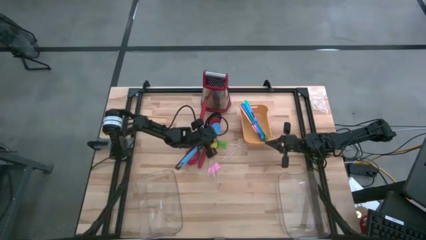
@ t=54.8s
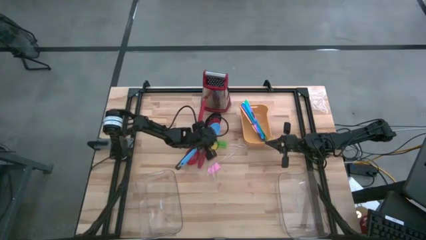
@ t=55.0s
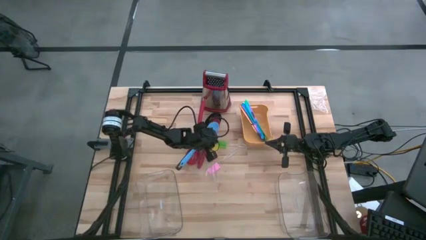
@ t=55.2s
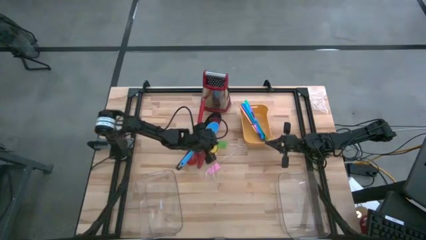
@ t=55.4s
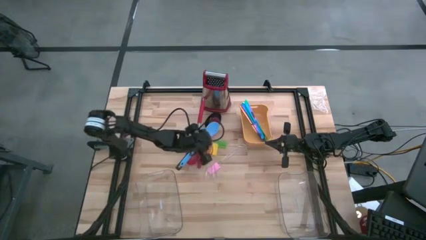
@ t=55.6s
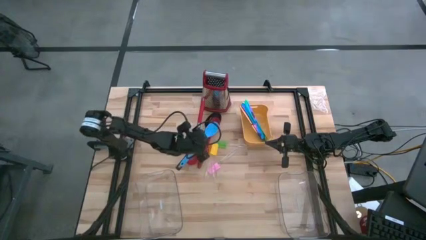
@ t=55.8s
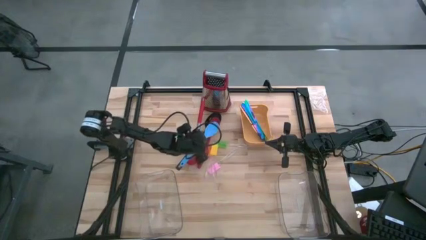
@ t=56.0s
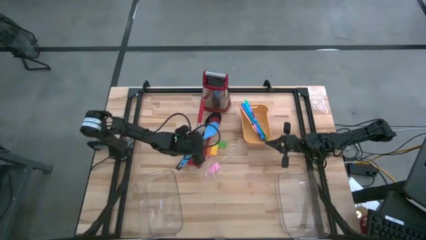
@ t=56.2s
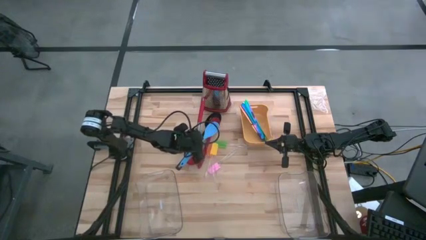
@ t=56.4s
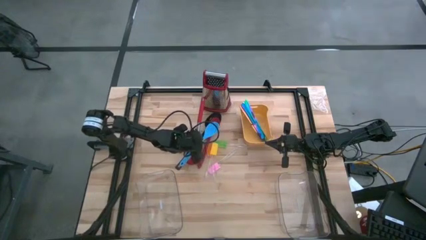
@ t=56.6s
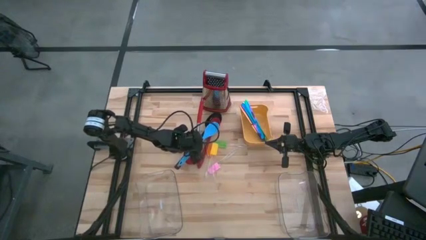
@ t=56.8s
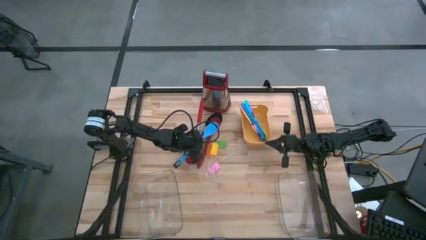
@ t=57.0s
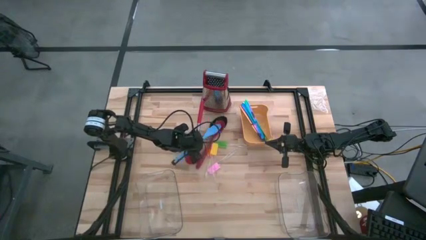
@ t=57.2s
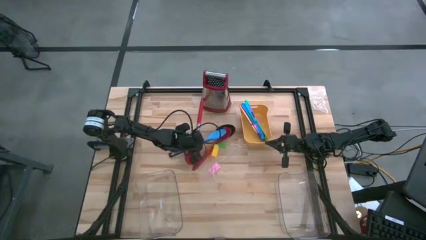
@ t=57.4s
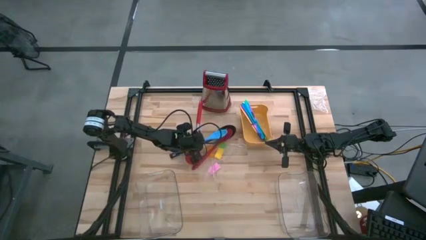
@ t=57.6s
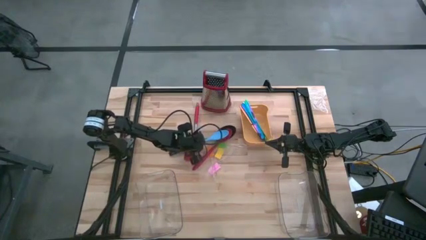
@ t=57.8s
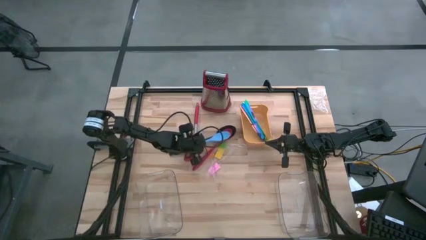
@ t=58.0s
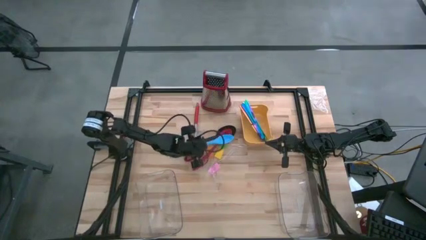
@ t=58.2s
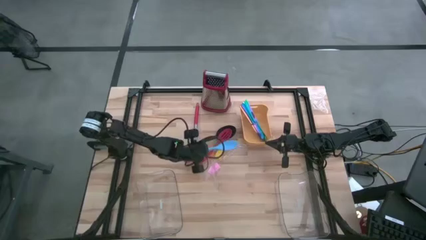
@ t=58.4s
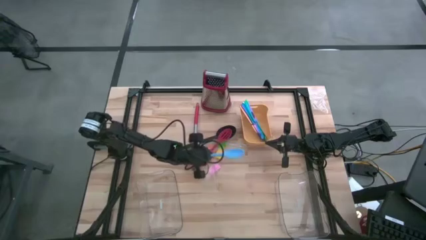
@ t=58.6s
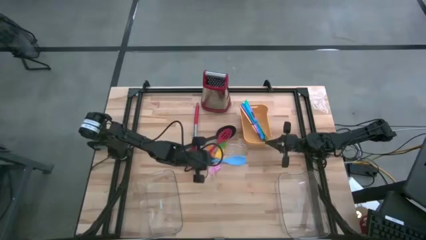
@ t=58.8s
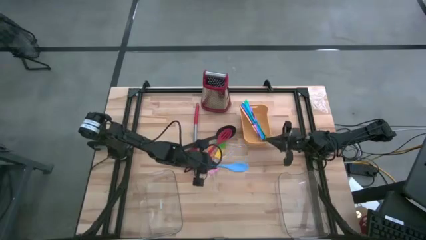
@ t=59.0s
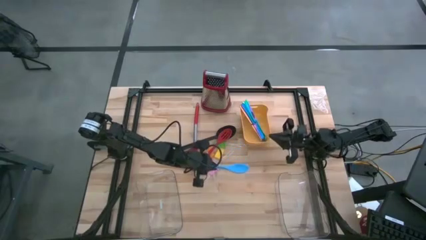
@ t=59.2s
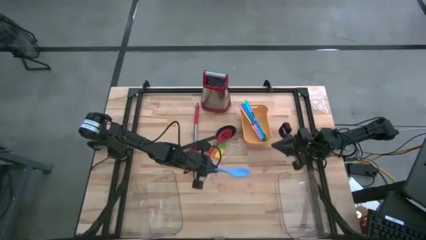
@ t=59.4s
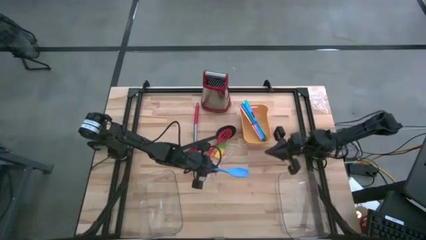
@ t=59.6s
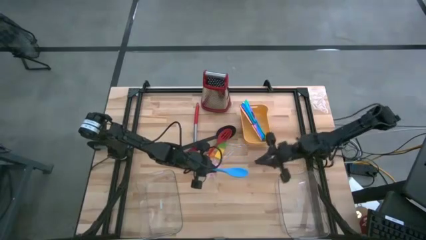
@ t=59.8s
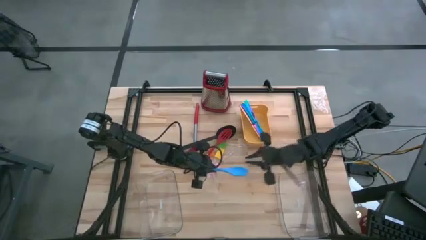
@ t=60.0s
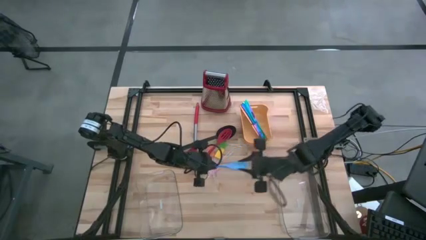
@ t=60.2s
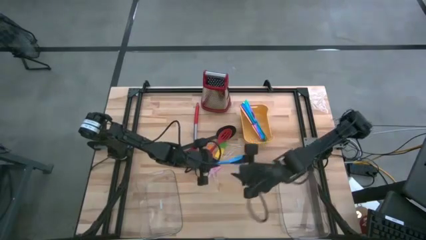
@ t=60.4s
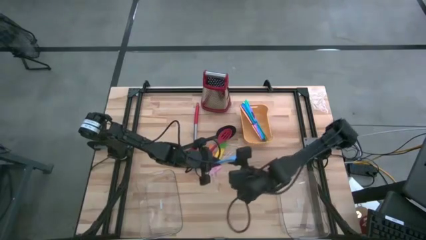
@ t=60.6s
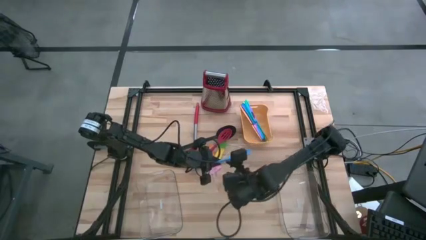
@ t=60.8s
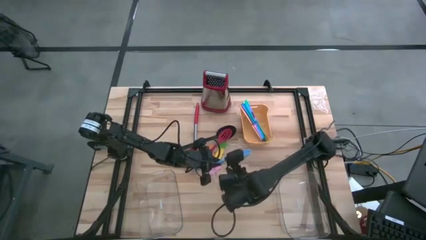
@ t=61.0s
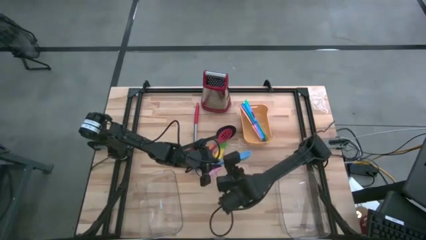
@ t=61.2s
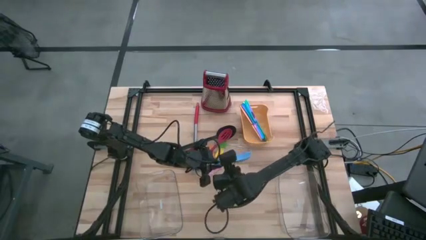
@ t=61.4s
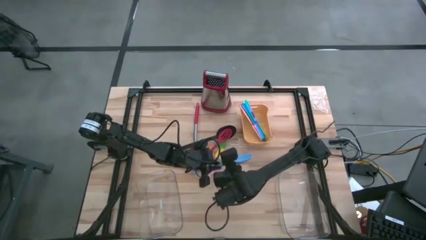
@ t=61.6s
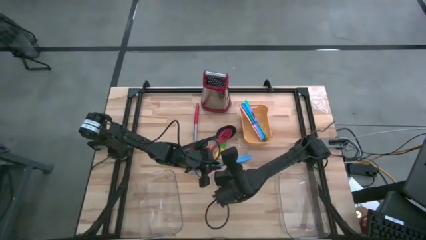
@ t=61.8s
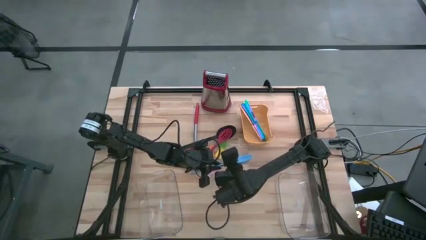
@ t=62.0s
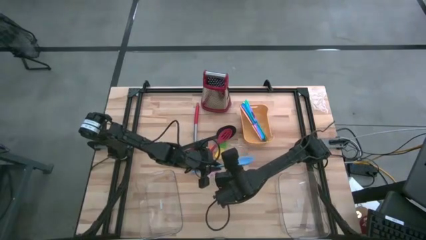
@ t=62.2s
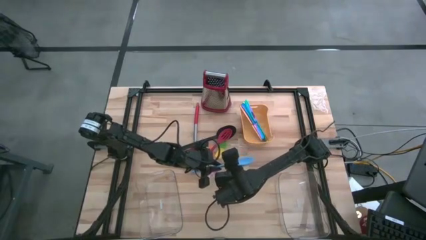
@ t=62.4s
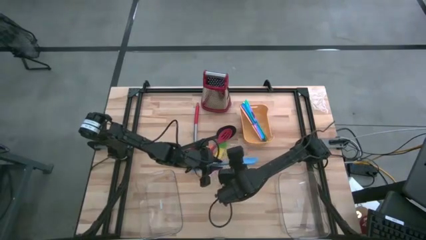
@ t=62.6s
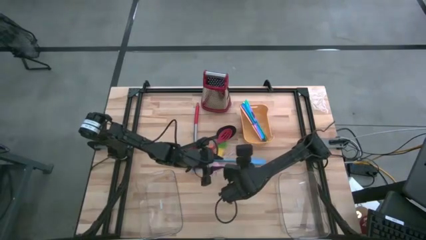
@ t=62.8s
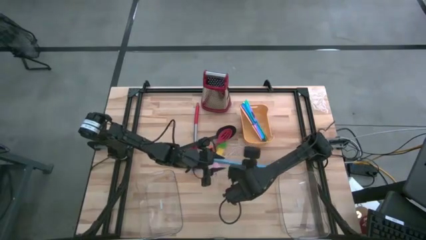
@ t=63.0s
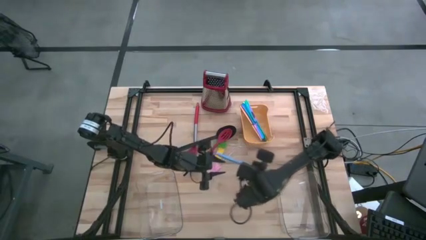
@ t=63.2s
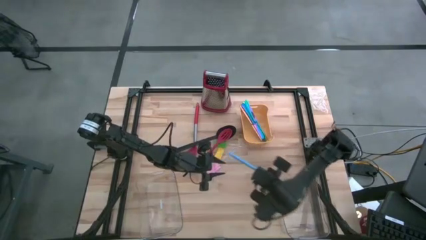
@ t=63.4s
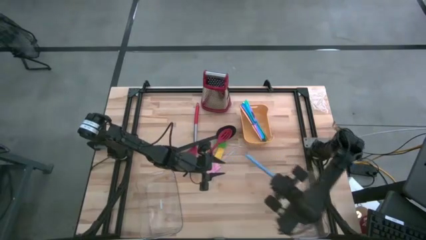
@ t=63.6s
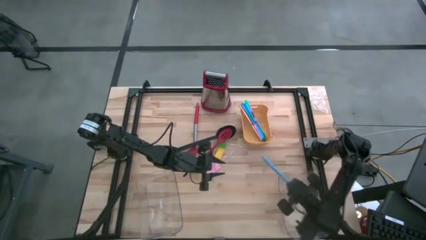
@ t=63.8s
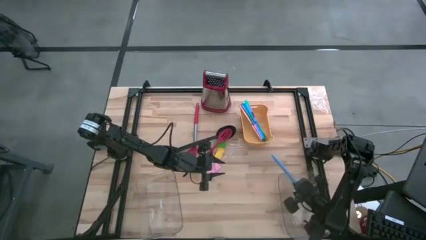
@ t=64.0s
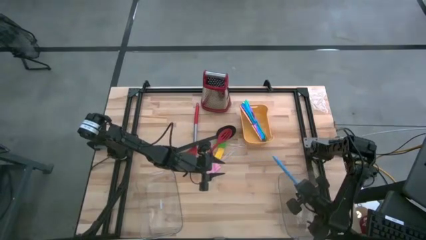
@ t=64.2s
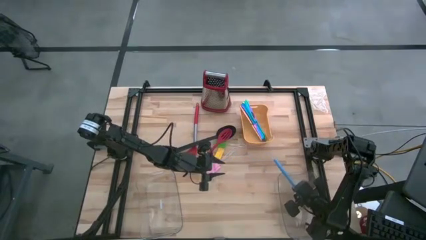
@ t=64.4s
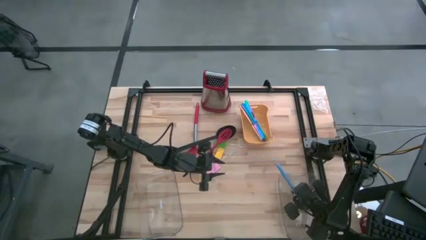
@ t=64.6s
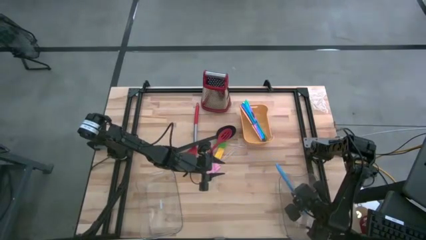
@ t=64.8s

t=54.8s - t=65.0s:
Task: Pick & Place Kitchen Items
Put the blue serving spoon into the right transparent bin

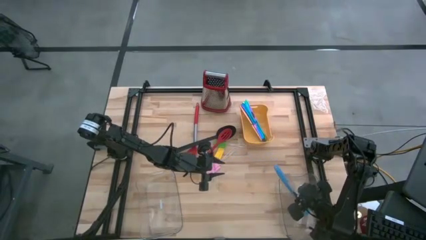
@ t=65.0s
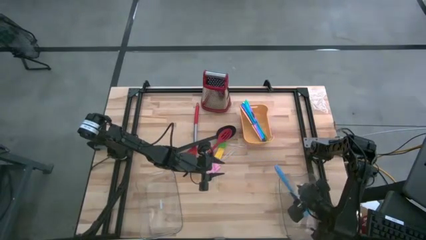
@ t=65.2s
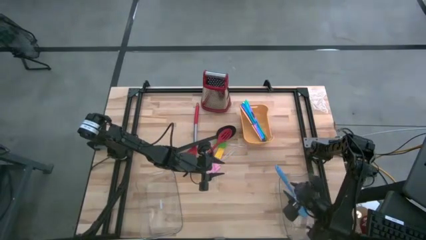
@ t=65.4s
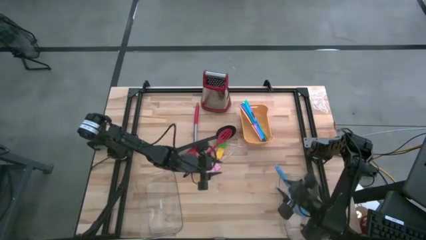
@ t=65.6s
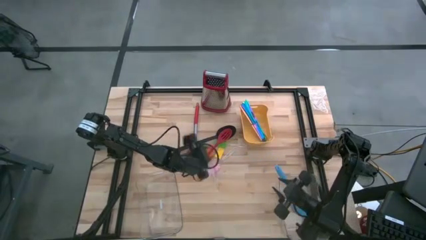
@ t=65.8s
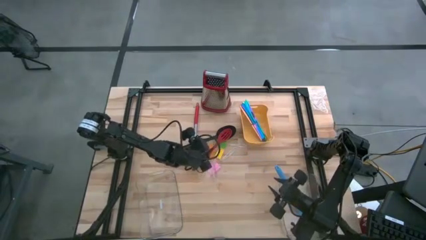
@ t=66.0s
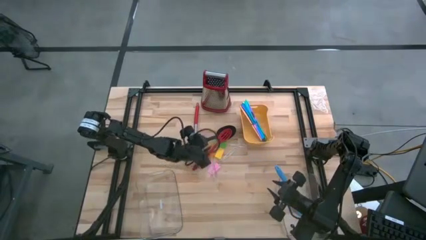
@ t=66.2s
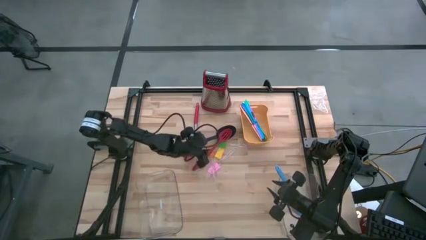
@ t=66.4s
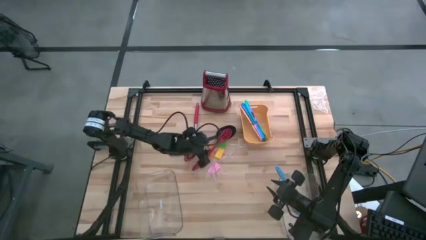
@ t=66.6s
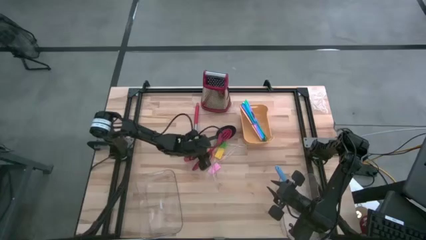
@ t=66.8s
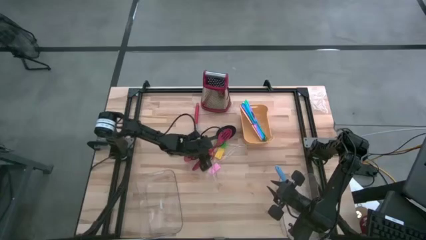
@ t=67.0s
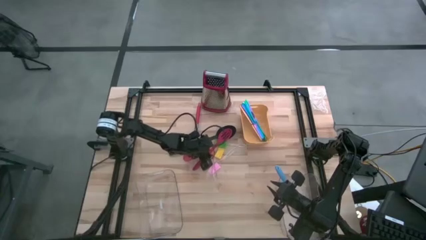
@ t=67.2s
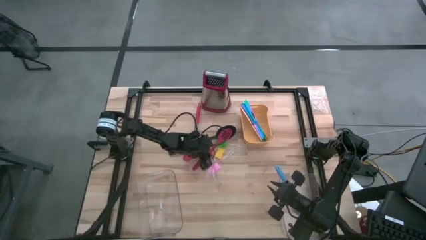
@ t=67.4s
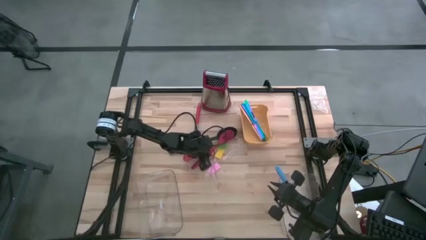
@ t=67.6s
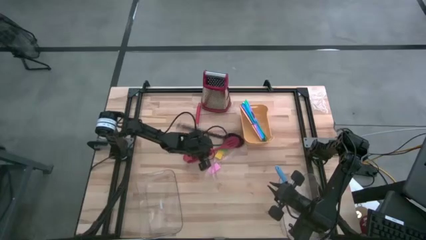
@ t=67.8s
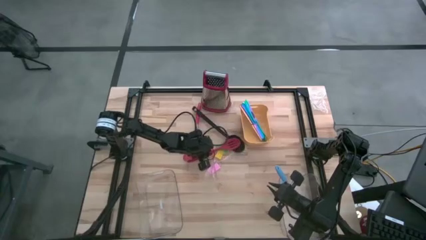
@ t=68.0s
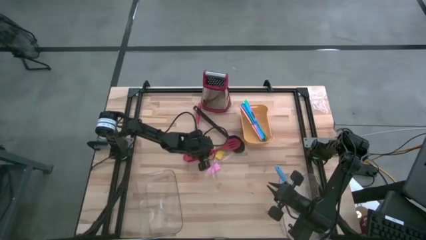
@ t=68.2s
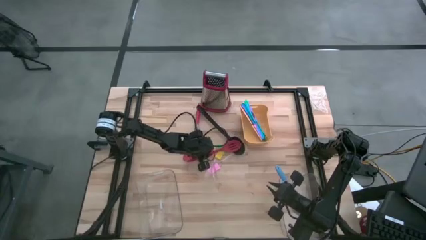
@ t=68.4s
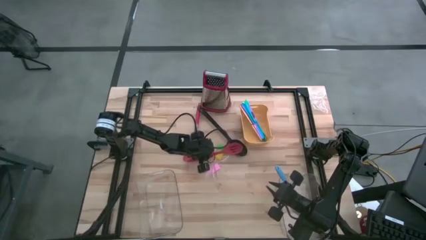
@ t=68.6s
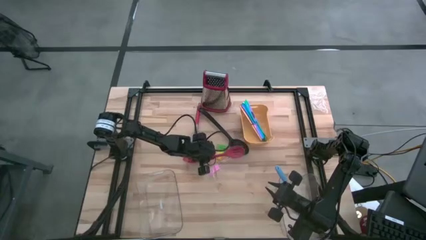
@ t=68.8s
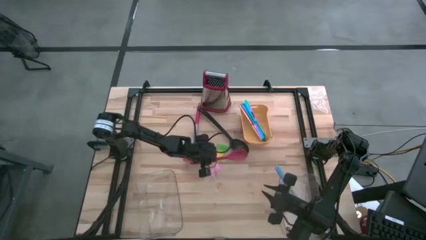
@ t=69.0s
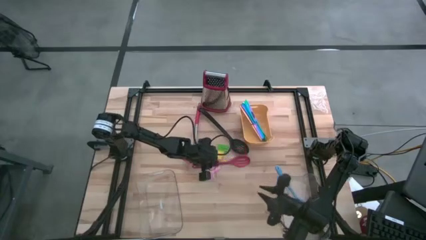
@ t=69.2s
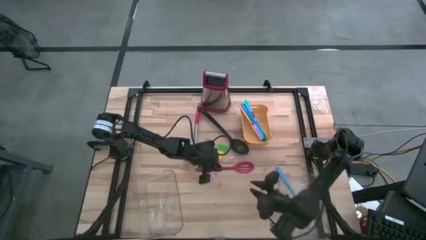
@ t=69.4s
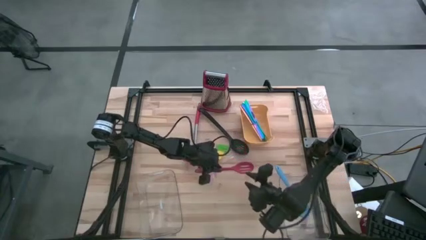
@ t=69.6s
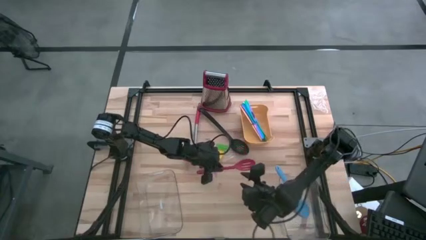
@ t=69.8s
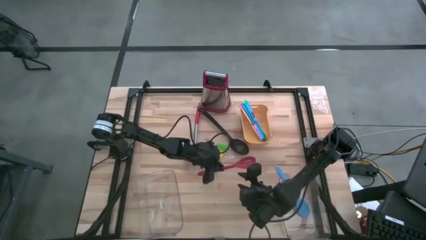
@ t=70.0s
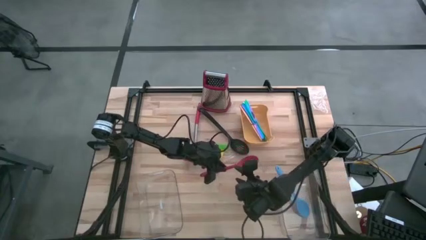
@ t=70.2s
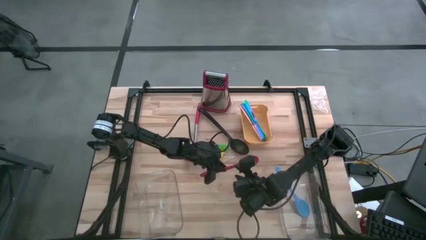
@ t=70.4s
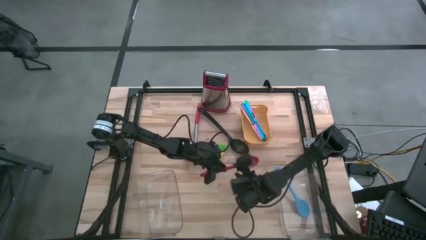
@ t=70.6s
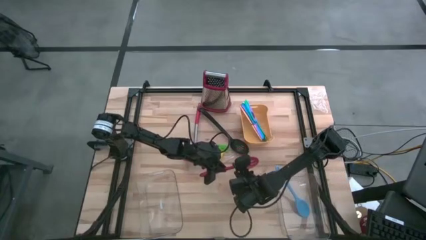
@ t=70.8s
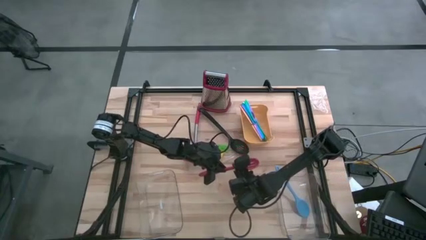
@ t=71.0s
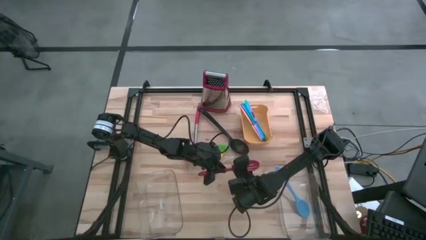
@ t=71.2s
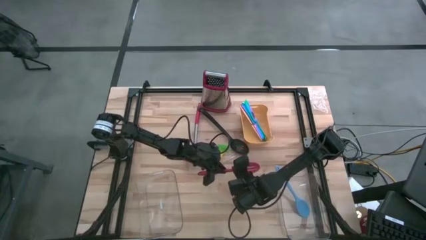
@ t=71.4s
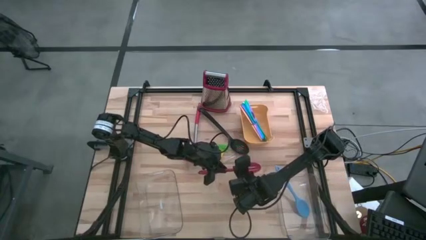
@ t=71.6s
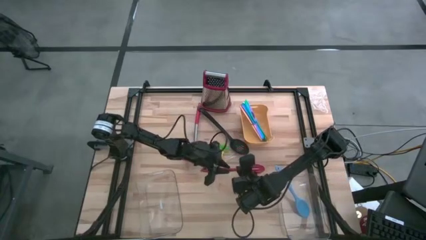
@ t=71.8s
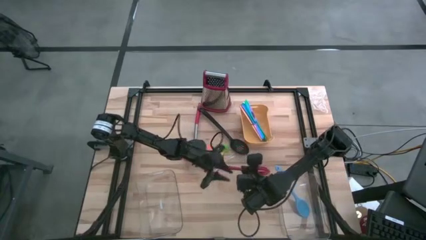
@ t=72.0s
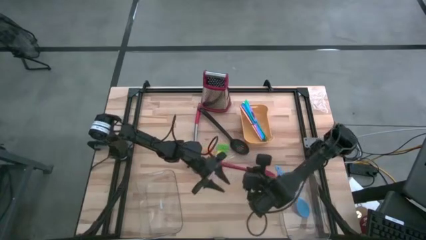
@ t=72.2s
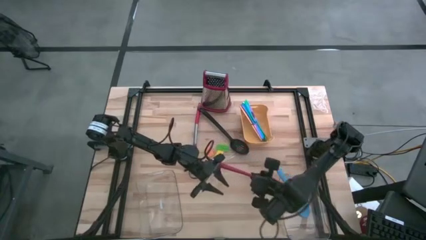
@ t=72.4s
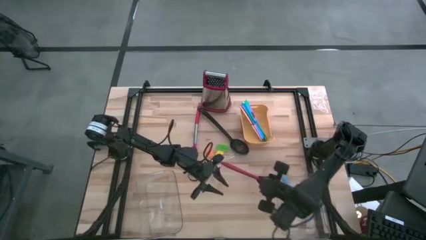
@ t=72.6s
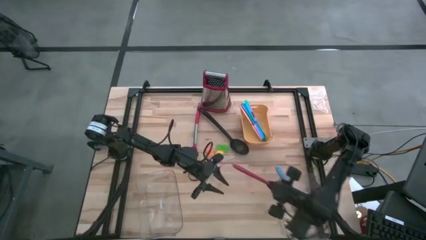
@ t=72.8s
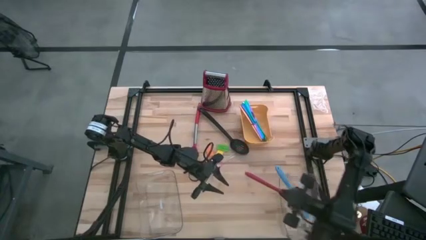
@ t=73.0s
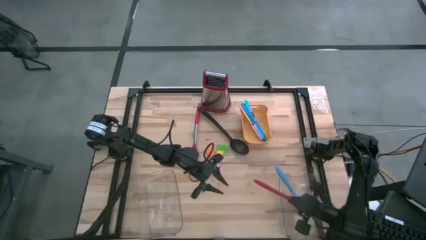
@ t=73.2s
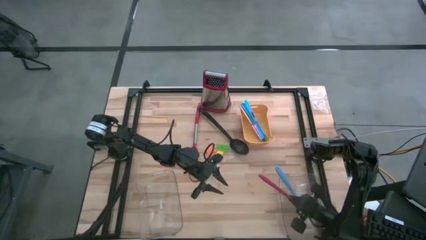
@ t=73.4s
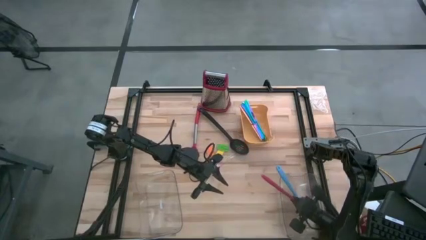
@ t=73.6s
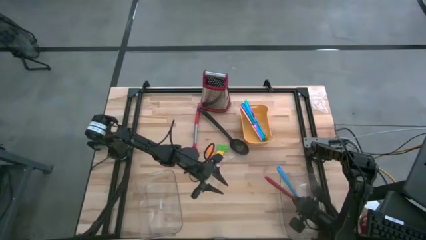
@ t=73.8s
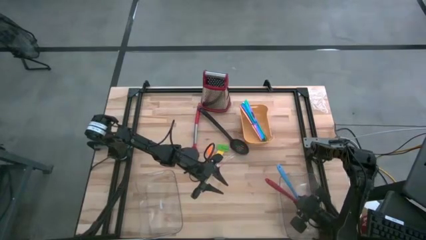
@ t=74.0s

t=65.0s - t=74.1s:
Put the red draining spoon into the right transparent bin
